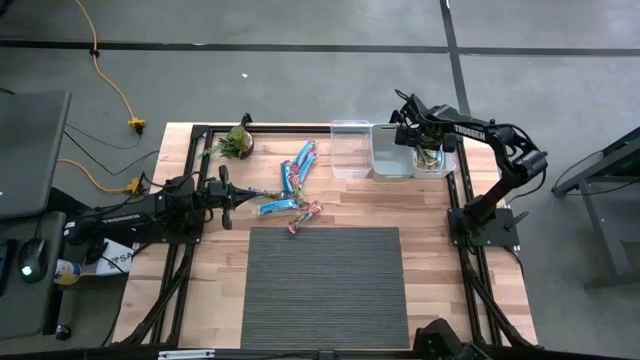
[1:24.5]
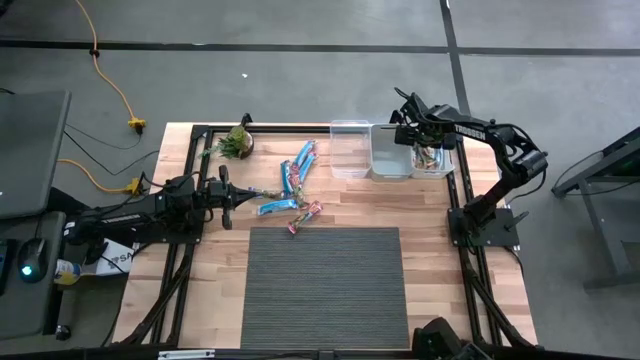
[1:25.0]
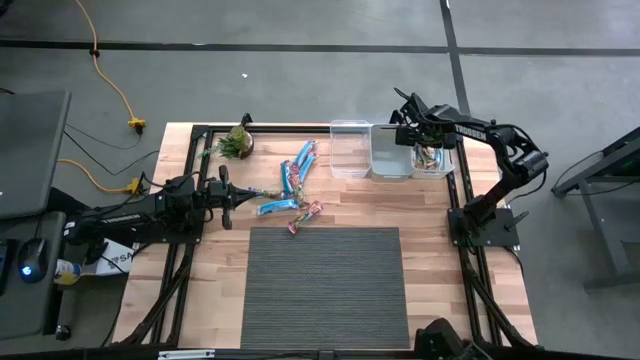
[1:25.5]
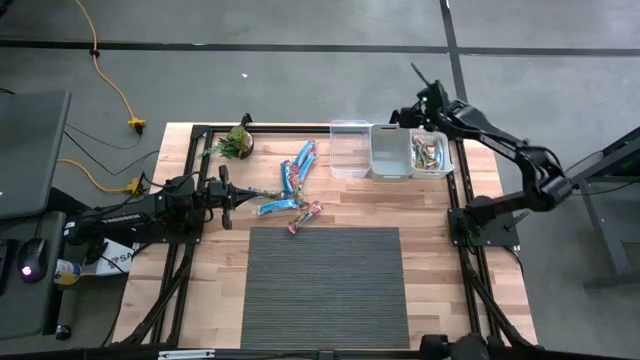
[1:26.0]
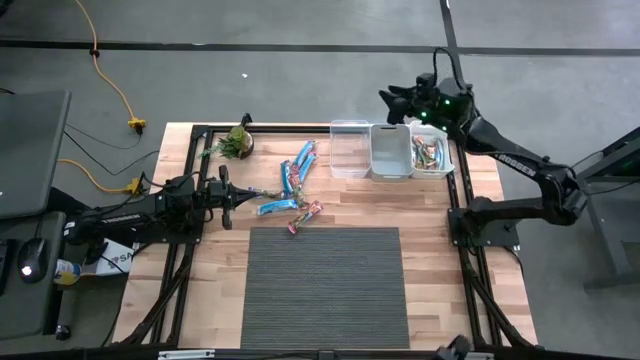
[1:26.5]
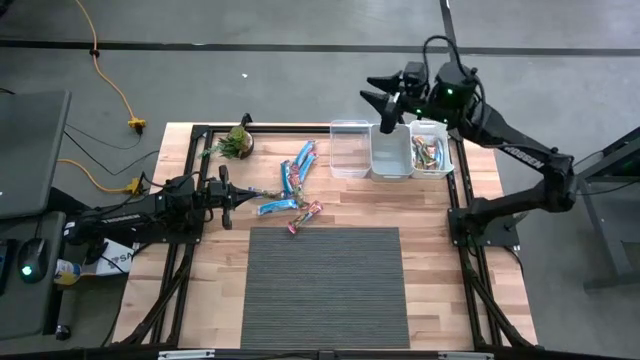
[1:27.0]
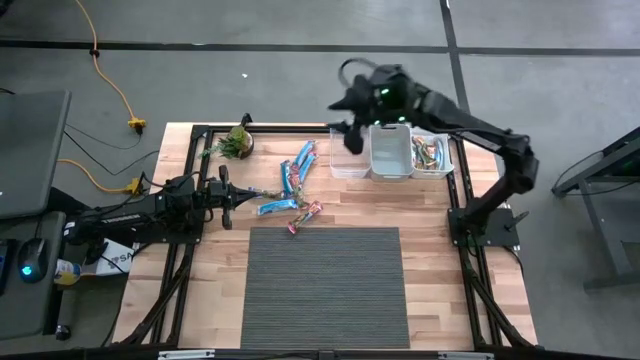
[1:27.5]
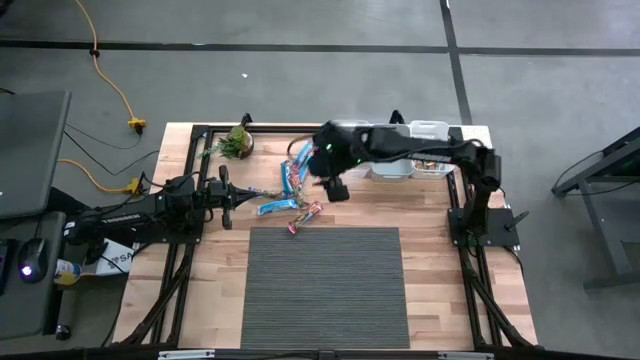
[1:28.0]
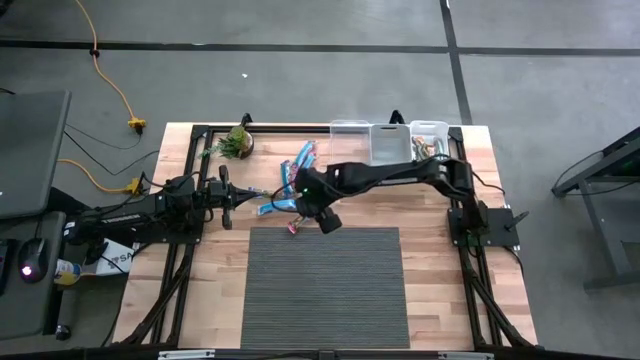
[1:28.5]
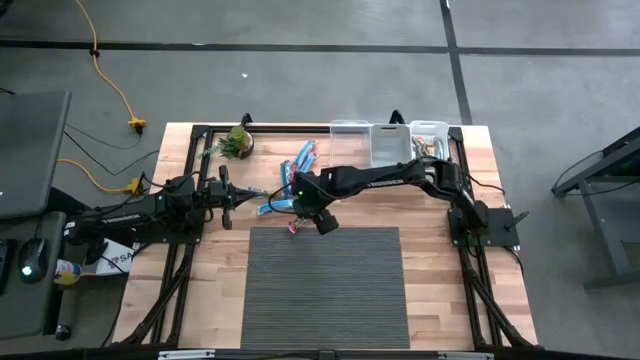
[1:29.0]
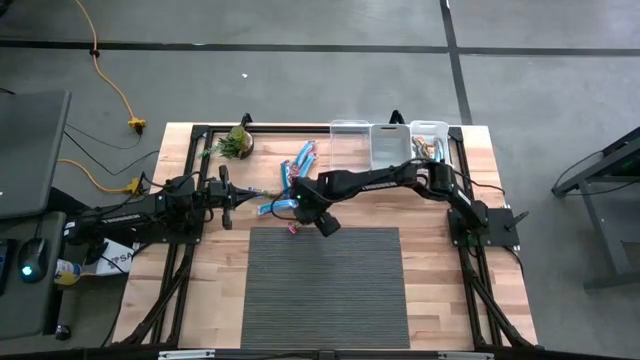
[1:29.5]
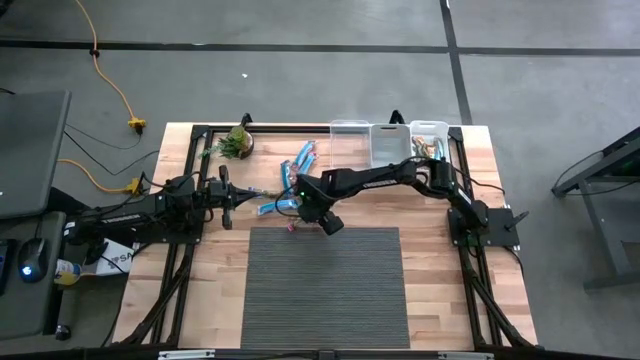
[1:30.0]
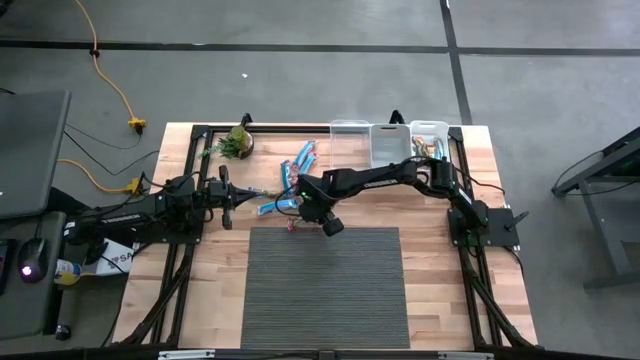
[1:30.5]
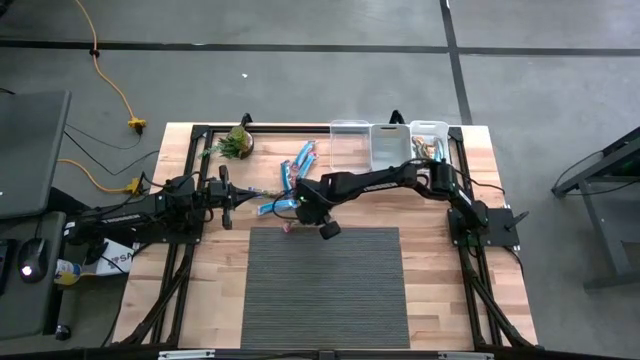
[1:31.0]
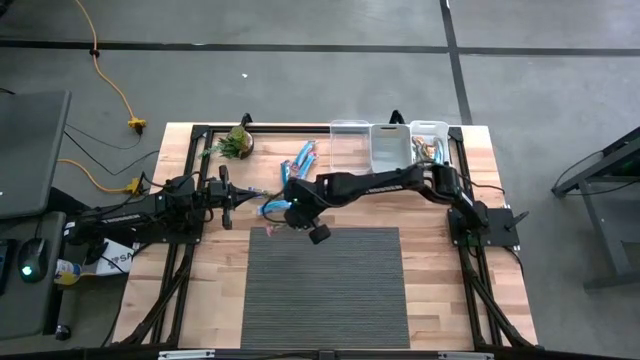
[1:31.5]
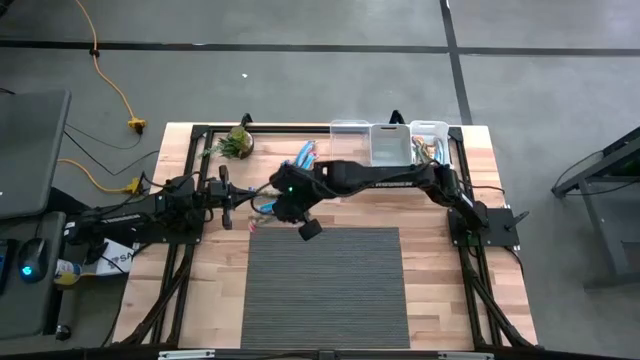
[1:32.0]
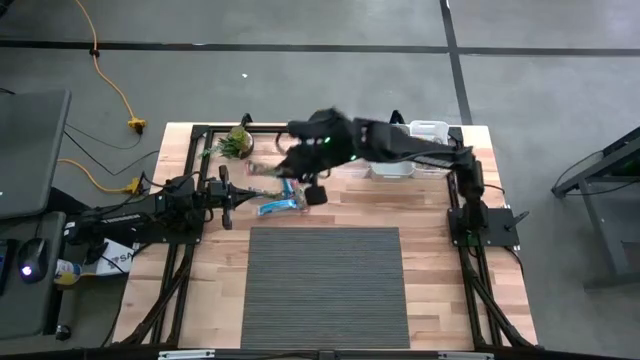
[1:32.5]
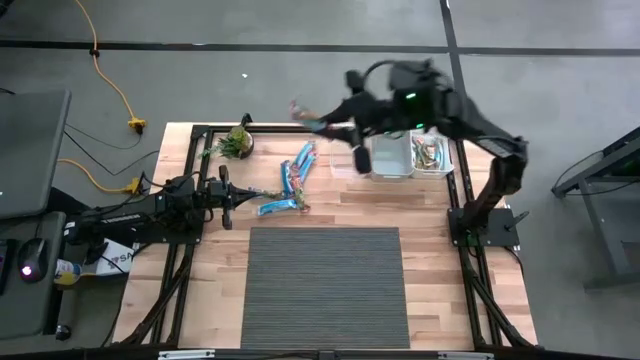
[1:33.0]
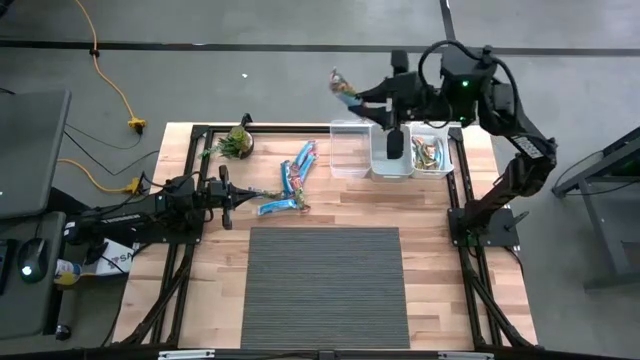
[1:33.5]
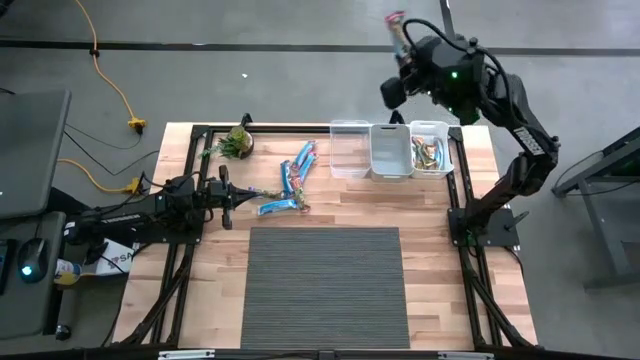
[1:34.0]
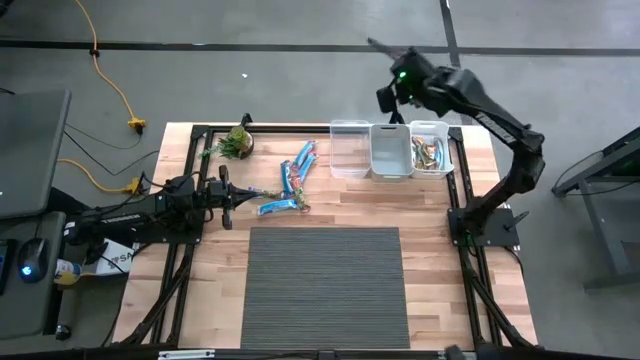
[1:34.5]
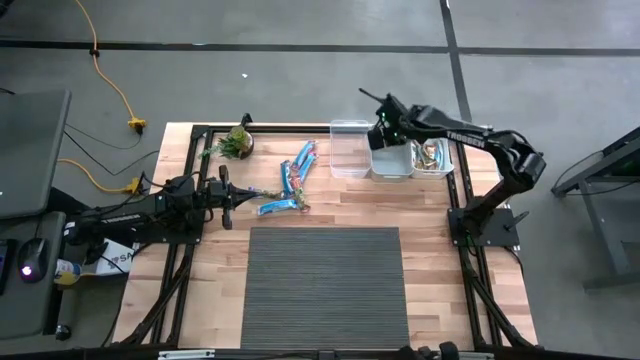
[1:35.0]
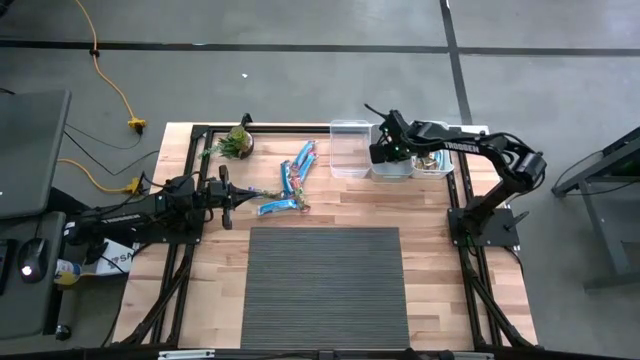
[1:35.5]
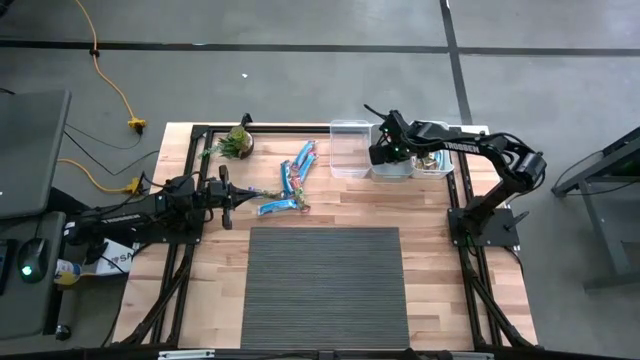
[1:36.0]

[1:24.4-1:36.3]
Task: Pick and place Granola Bars by type
Put the red granola bar into the gray bin

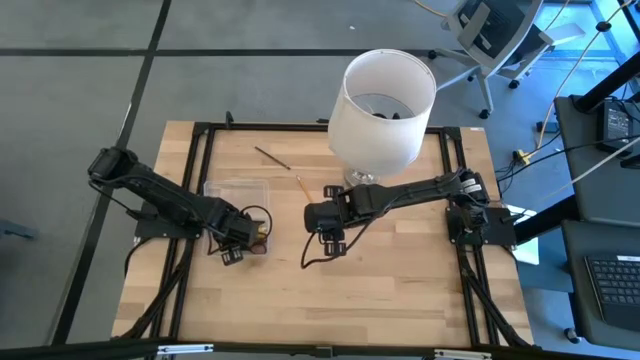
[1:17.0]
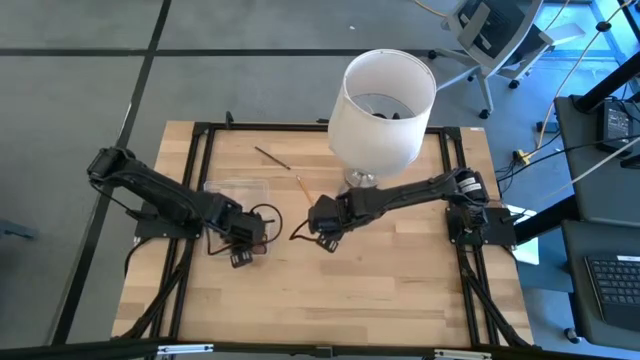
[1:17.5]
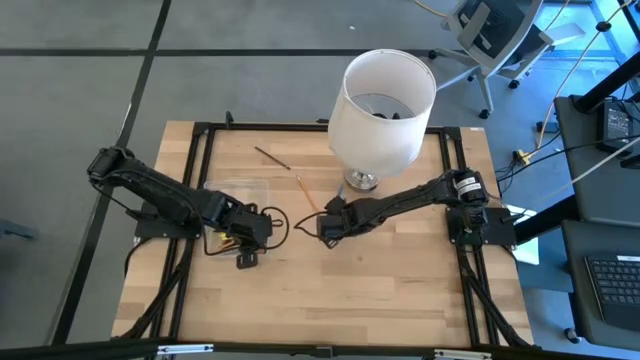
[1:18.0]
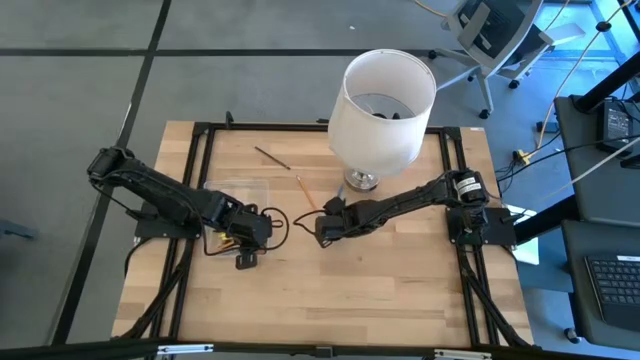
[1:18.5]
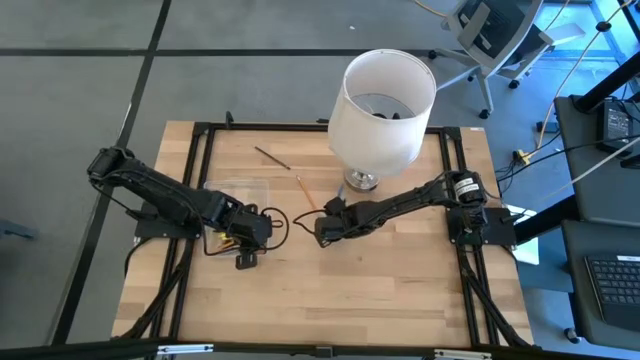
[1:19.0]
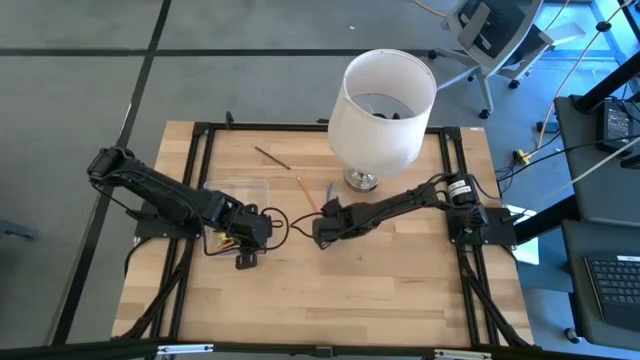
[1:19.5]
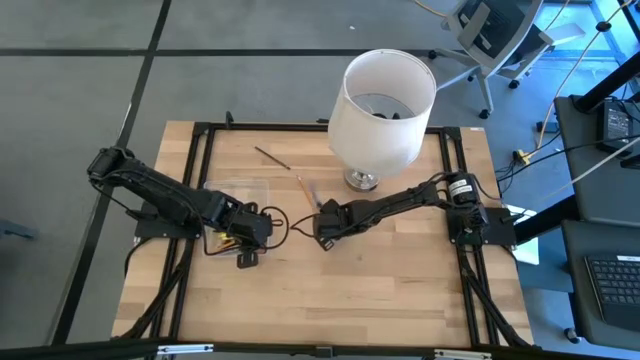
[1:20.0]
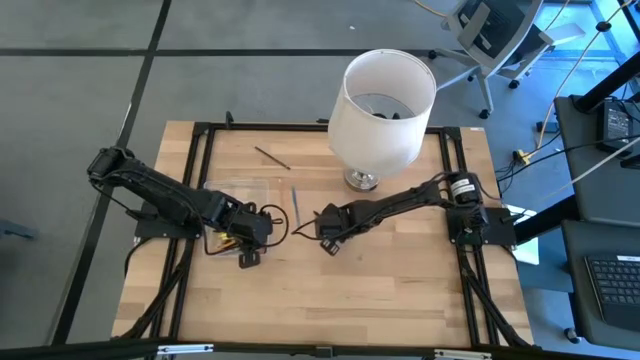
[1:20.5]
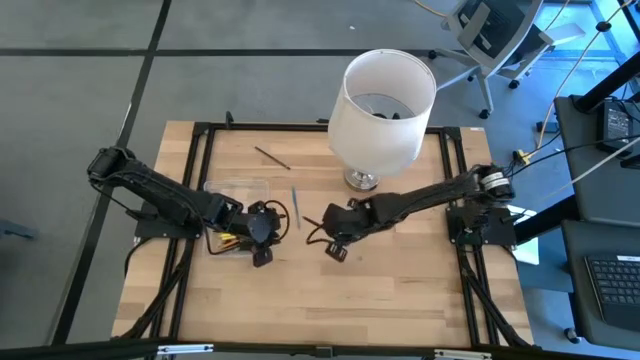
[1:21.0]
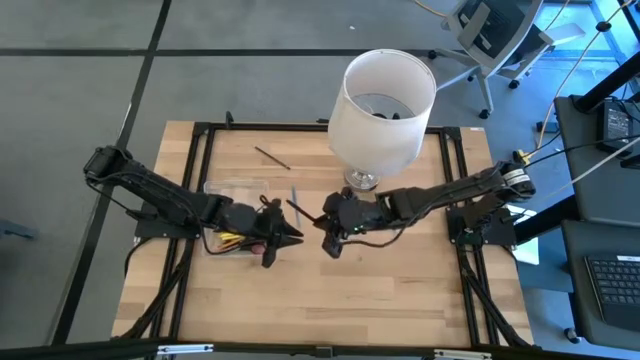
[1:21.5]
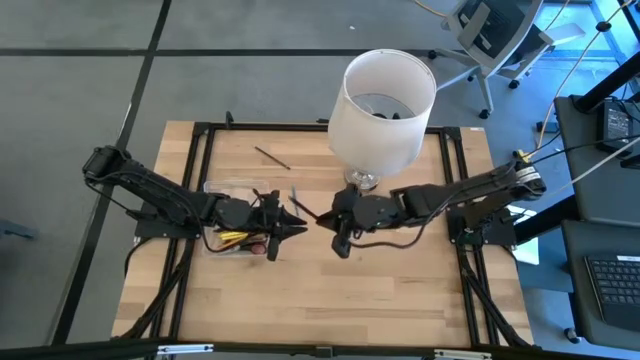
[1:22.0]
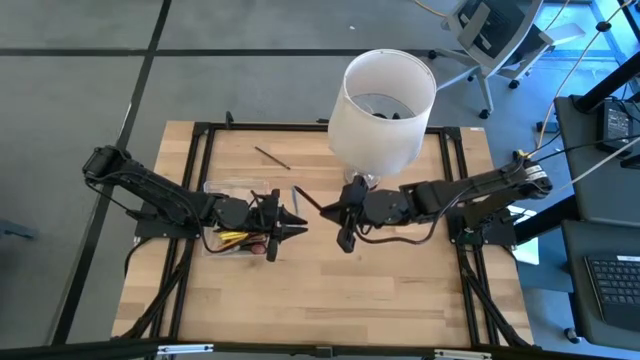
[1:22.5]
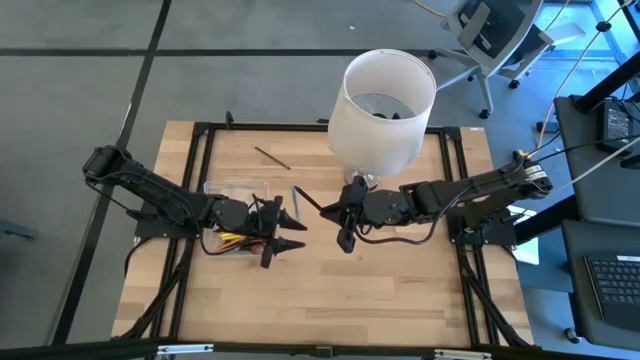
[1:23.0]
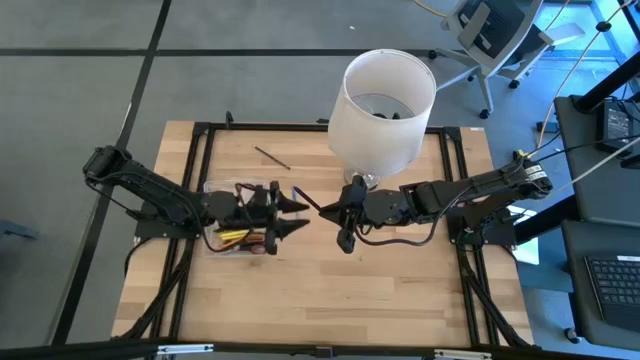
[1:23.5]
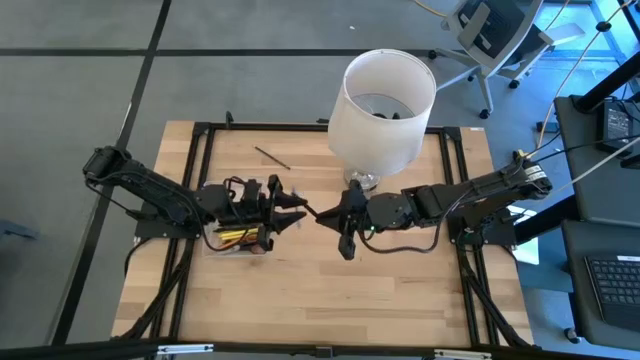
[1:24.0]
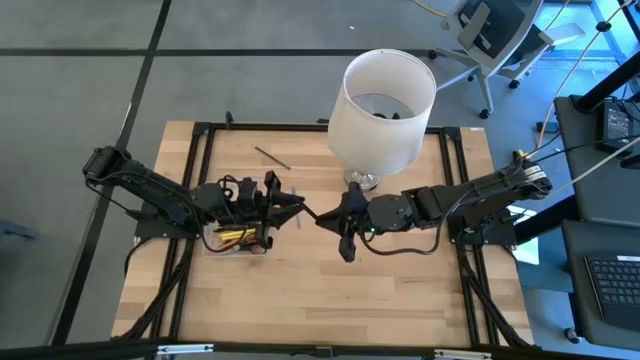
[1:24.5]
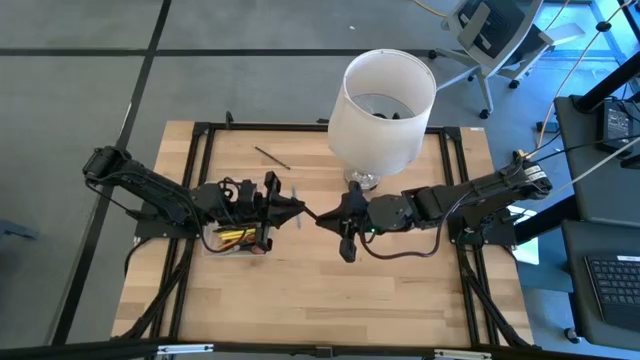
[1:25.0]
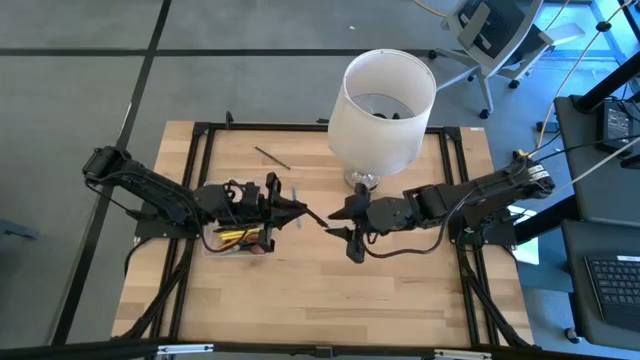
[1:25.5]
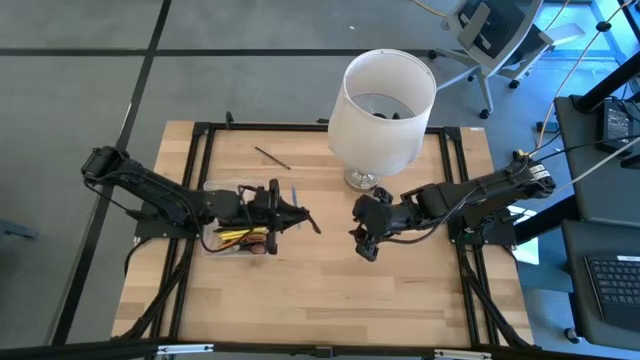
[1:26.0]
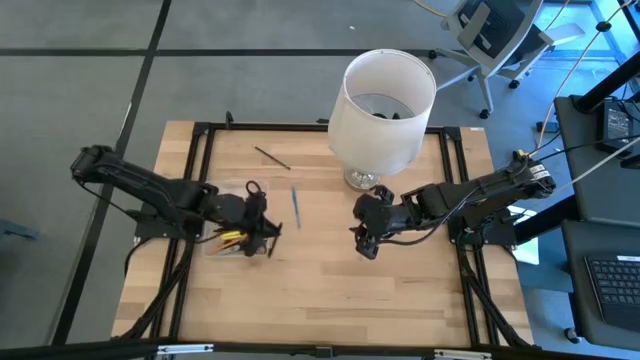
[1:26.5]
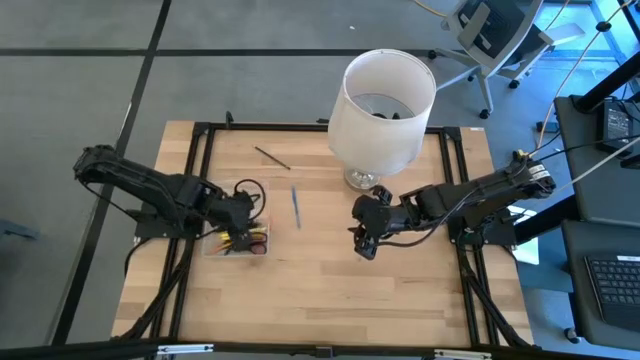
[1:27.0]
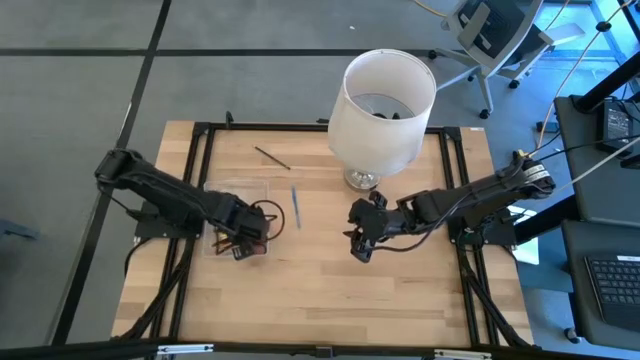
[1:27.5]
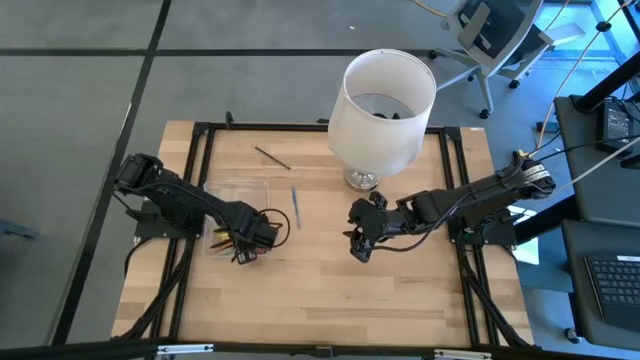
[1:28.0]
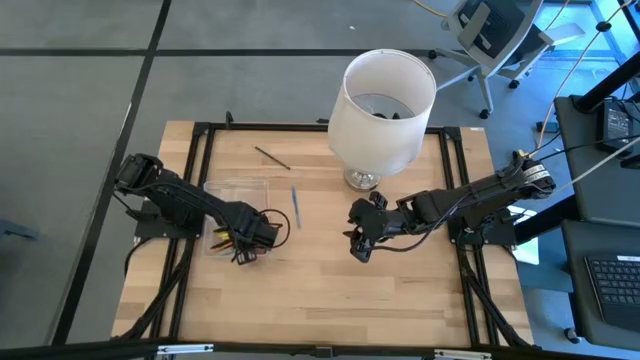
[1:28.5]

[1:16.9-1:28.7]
Task: Pick & place school supplies into a supply box
Put the black pen into the transparent supply box
